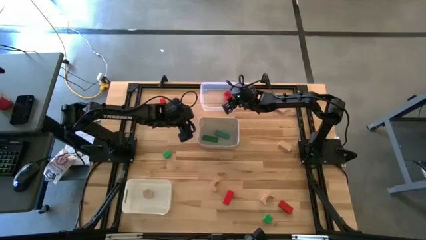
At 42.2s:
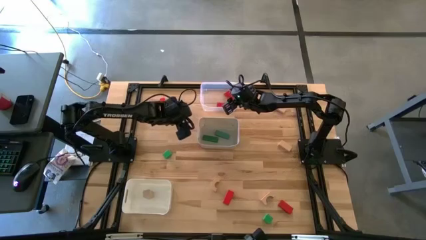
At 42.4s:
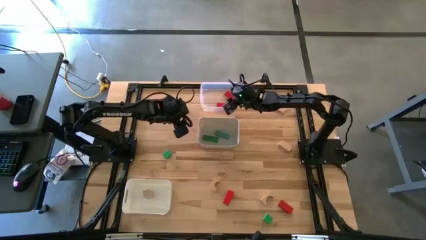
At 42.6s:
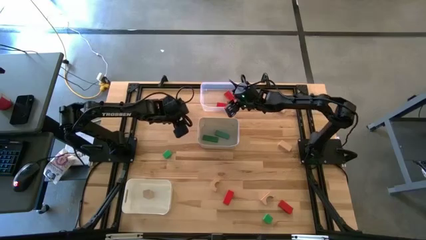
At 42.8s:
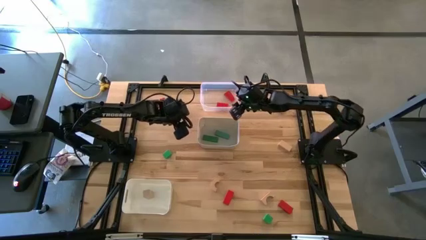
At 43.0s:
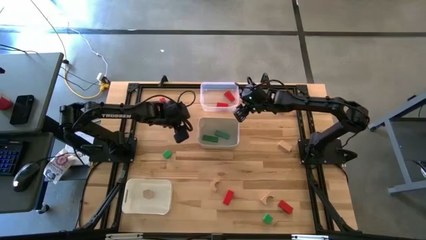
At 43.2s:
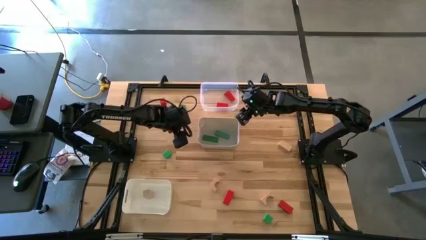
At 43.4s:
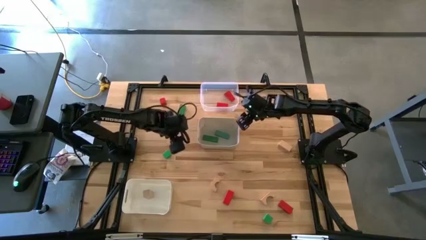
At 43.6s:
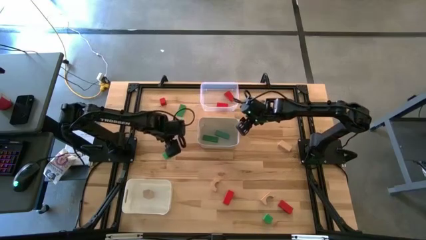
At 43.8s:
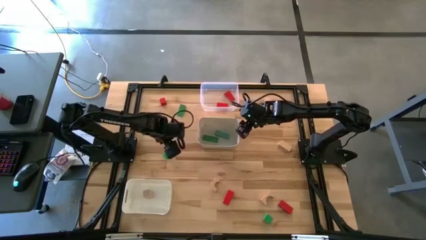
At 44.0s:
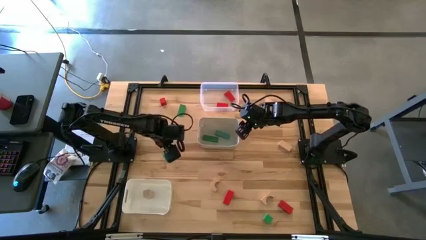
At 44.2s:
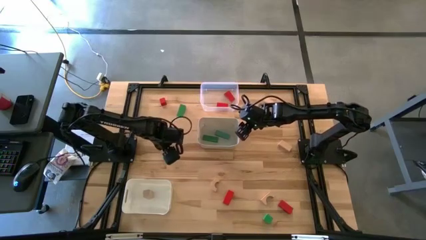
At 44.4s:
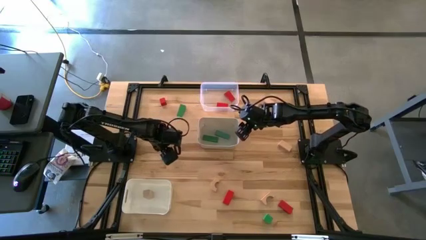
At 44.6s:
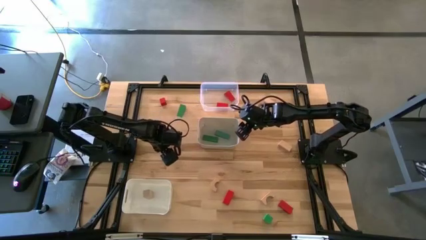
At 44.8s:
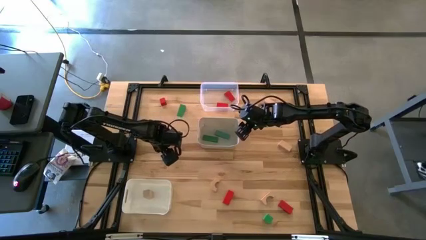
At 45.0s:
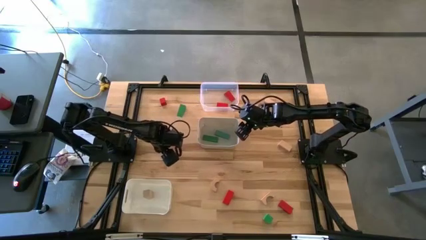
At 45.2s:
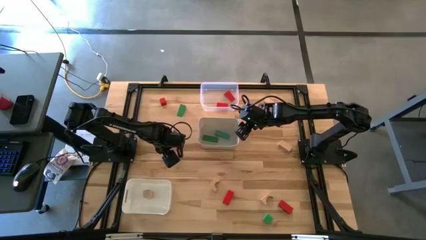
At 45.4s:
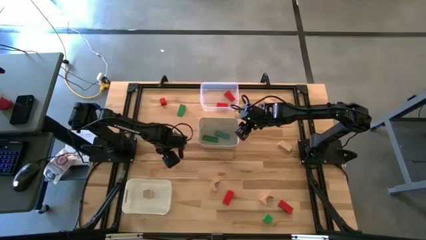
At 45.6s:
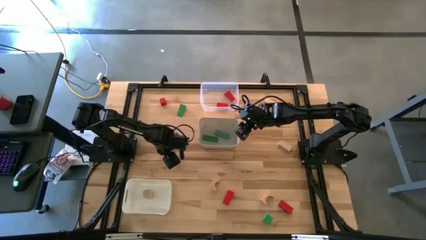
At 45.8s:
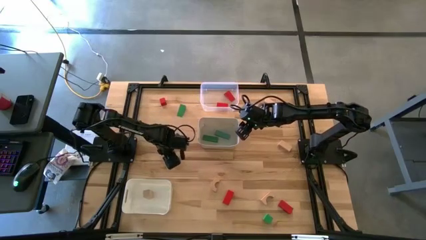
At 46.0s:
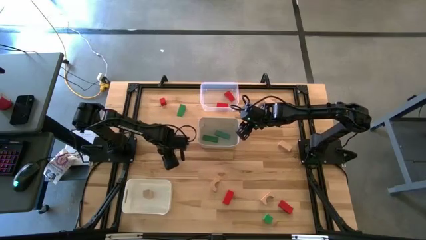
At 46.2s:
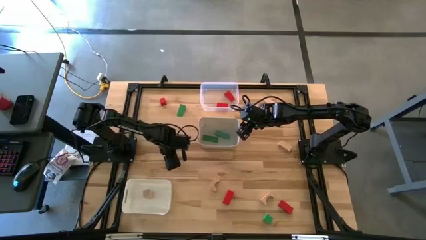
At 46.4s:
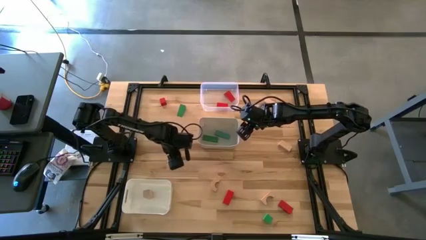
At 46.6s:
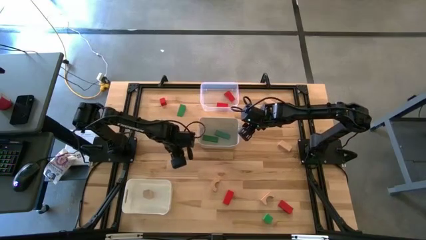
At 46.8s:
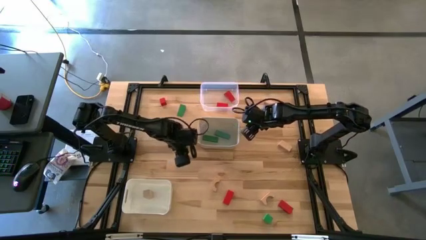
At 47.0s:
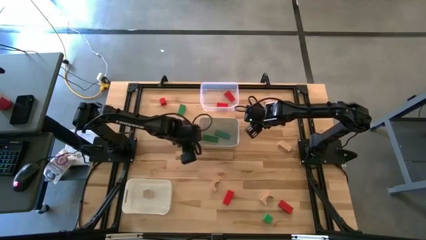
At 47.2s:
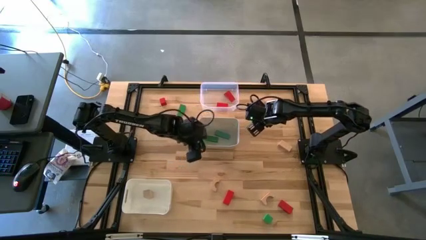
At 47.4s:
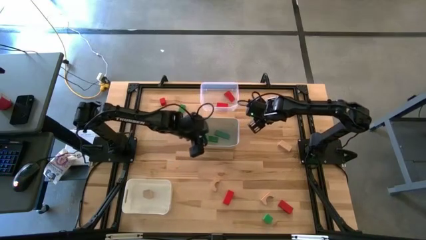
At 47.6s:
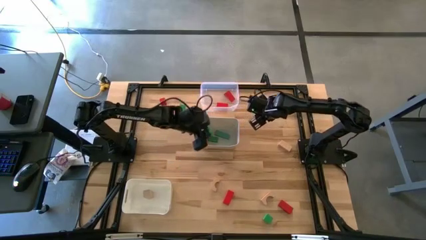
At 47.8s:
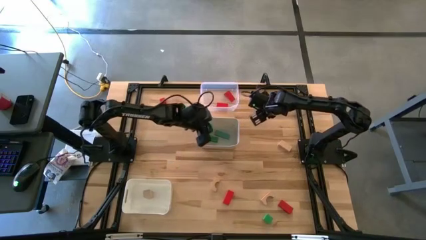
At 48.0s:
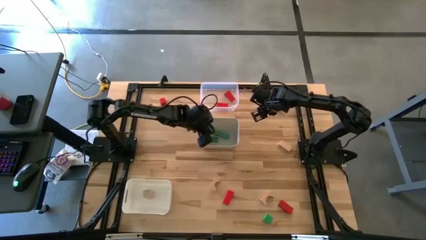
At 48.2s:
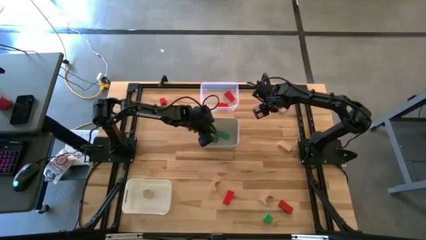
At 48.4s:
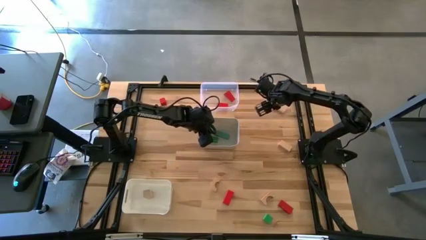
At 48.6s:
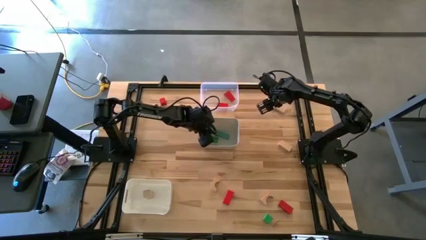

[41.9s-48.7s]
Task: Sort & place blocks by color
Put the top green cube block into the top white bin

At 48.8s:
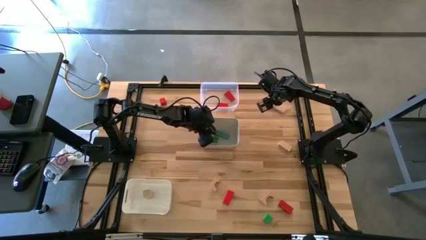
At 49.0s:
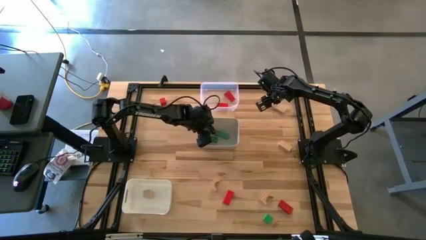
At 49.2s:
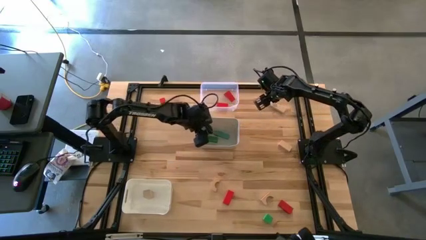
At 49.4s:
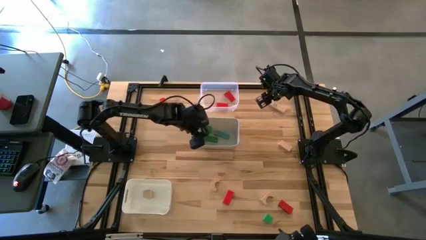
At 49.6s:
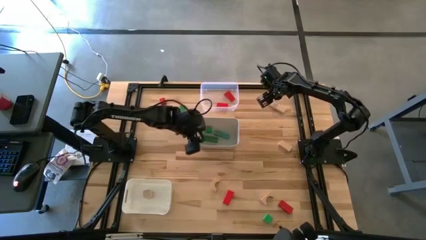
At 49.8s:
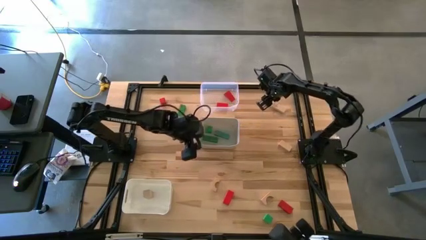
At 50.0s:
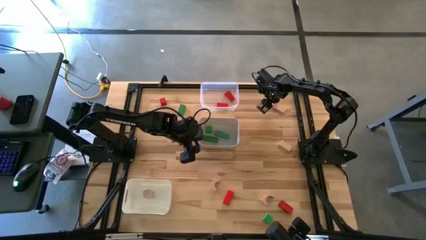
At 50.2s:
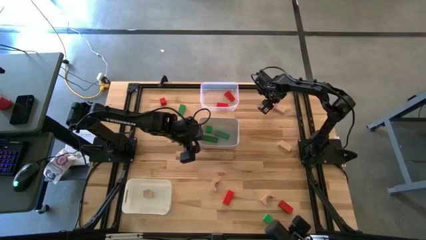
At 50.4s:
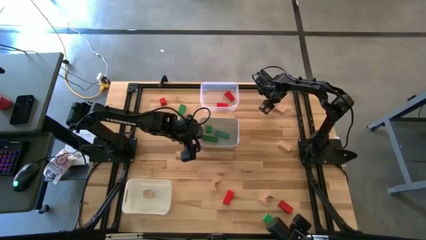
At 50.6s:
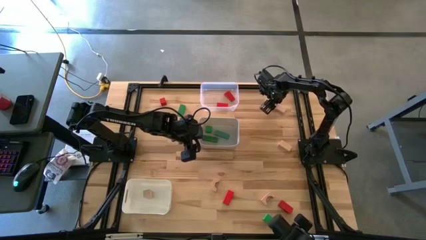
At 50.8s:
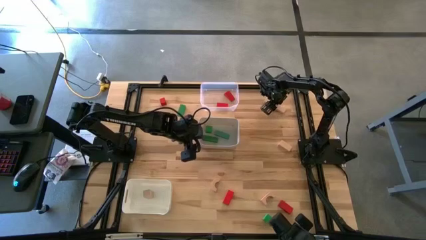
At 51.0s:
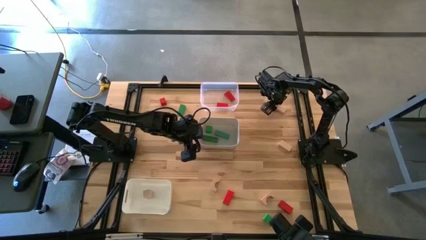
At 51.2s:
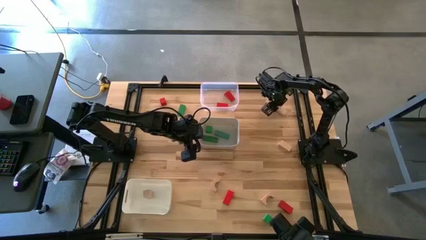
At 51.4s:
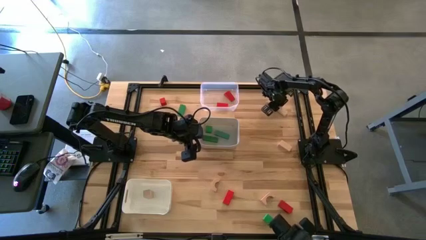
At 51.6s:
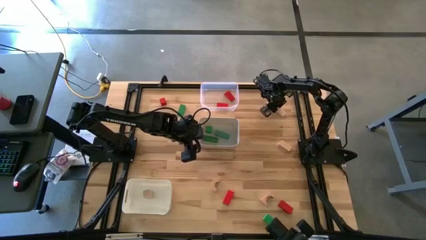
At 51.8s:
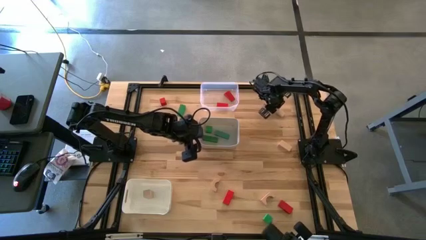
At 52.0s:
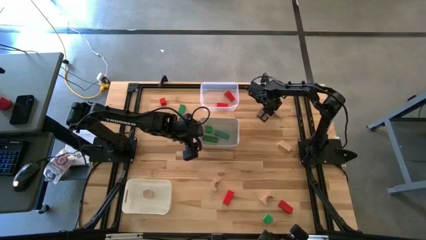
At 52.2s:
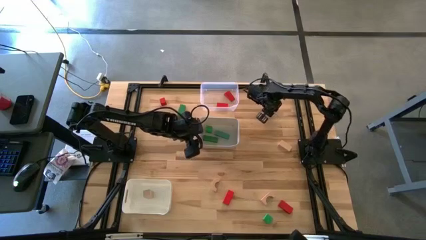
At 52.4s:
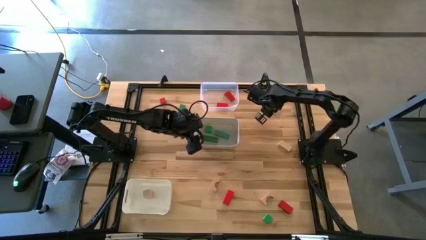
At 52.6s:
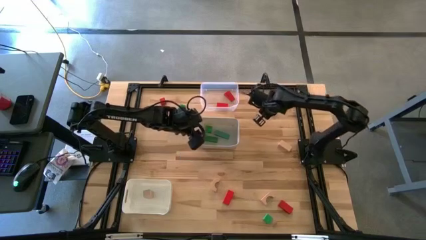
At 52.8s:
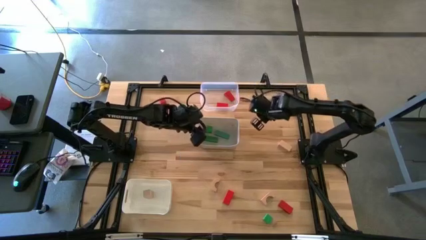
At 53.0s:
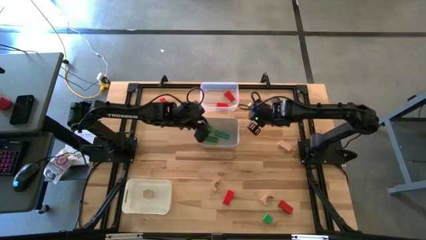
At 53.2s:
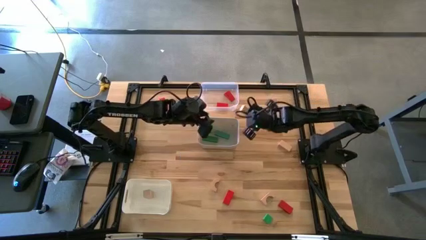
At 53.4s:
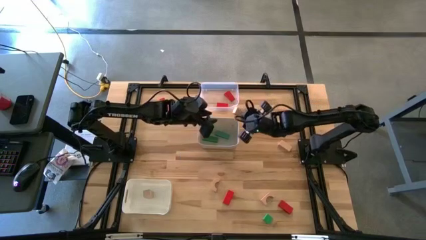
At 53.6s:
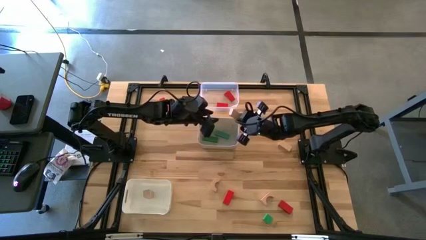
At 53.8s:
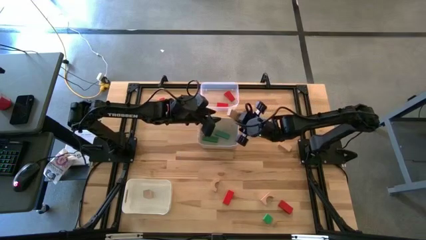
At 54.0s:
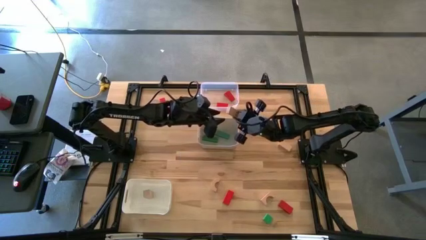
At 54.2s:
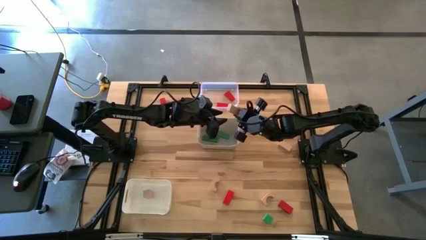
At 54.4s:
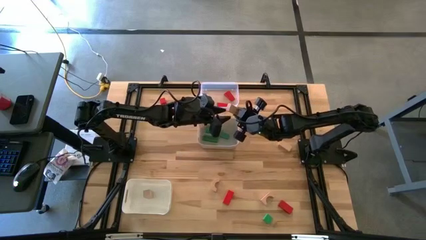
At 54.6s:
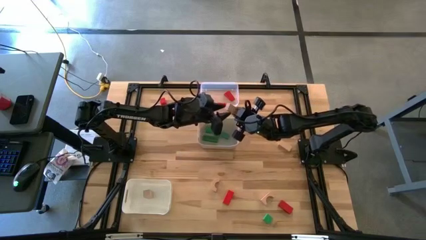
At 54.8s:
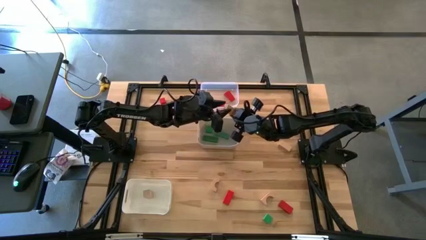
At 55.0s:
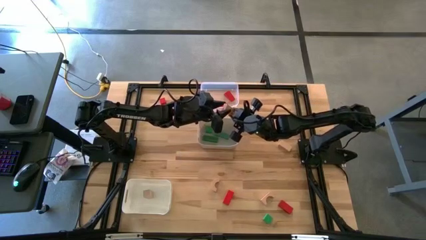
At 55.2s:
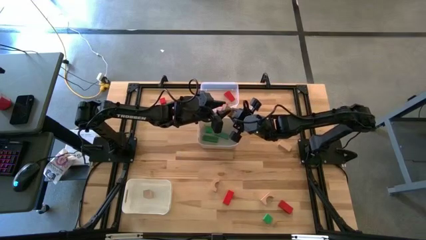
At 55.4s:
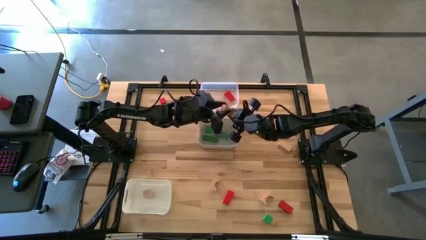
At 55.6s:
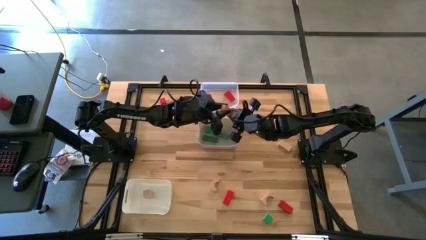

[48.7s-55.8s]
Put the top brown rectangular block into the bottom white bin

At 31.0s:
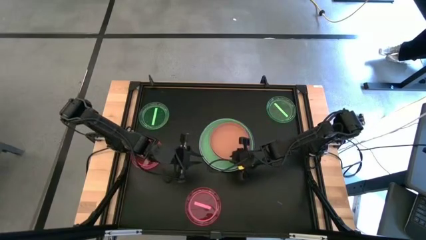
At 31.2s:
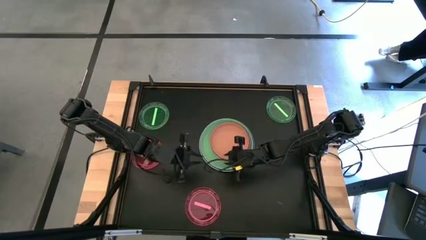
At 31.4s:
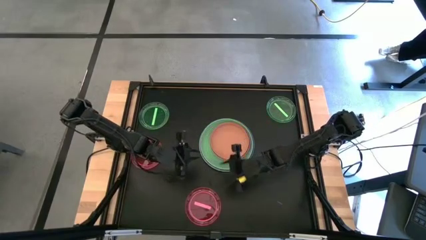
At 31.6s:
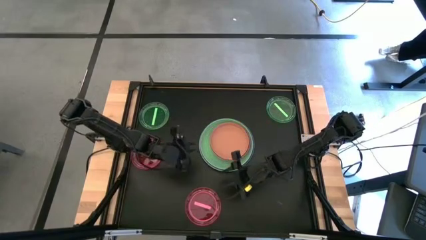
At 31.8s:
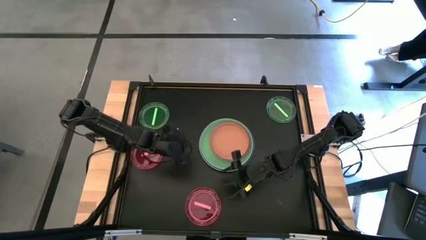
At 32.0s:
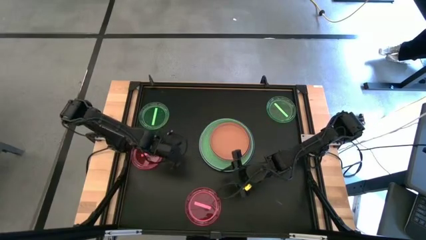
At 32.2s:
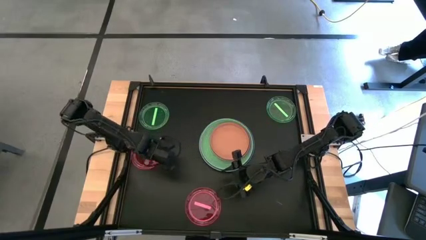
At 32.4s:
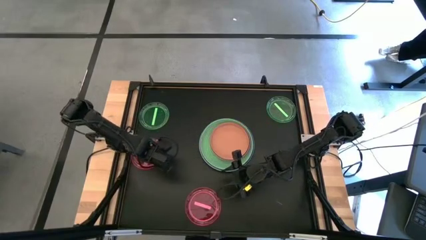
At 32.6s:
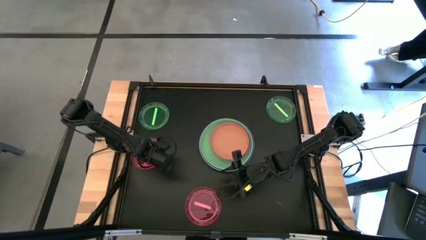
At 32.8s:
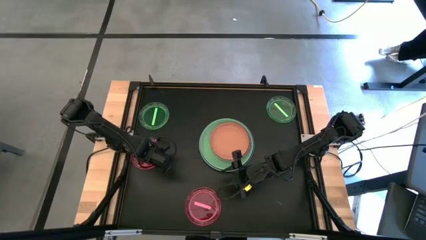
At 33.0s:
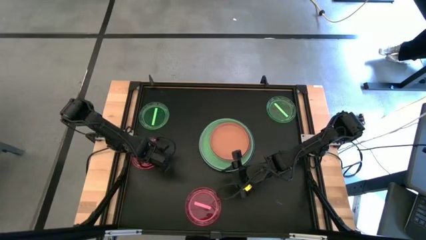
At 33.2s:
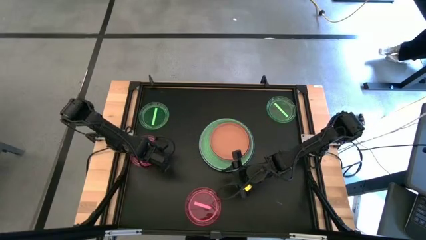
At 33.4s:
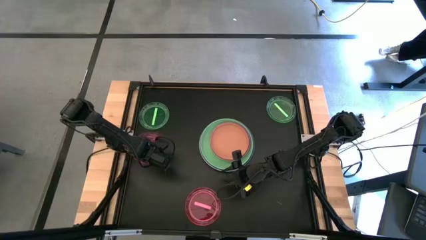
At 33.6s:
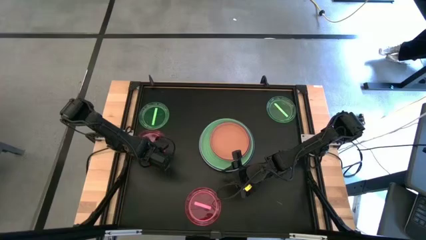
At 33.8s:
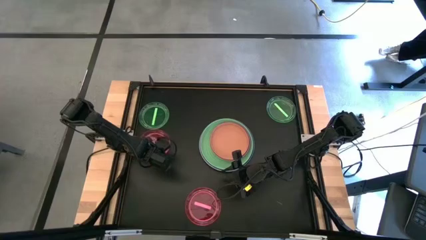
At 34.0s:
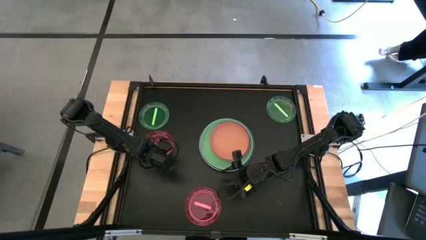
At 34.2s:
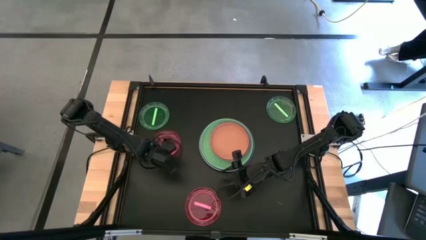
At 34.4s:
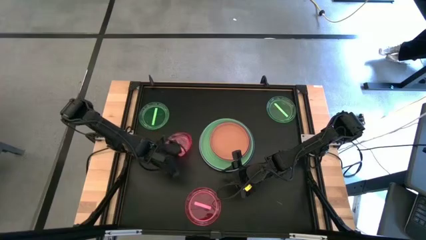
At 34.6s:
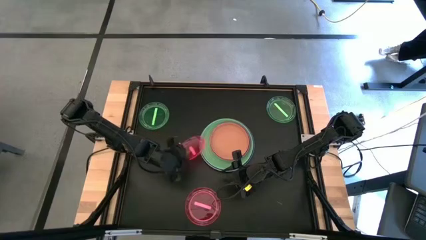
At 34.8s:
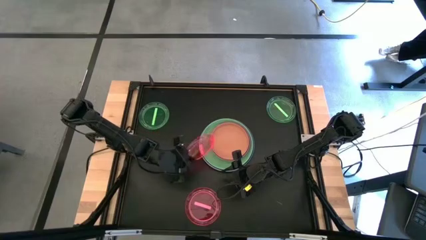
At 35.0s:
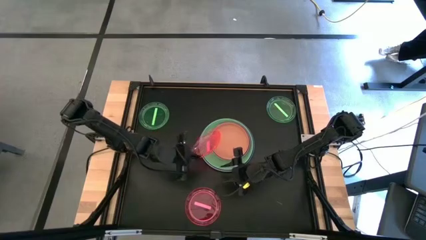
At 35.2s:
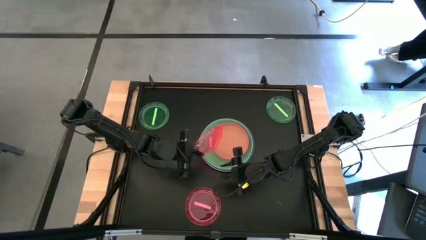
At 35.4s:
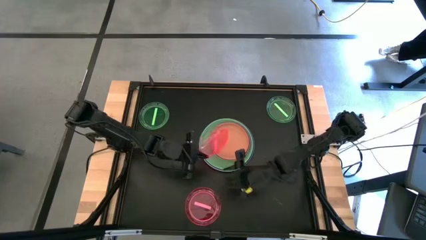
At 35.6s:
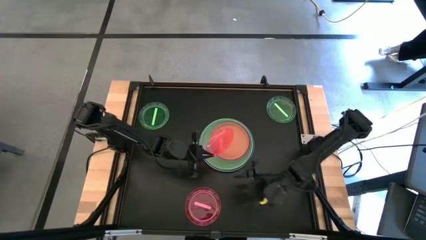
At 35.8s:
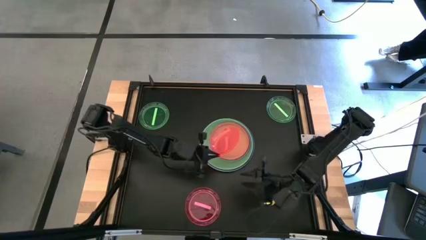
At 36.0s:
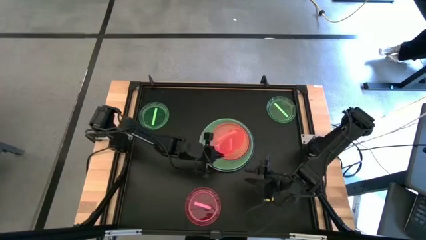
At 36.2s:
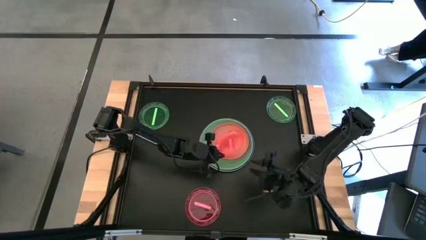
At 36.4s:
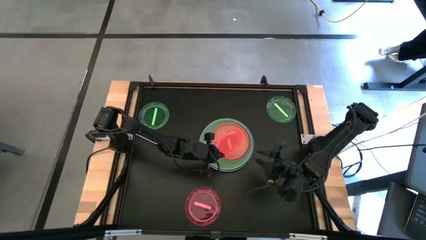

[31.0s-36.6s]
Task: Stack plastic plates
Stack the small red plate on the small orange plate
